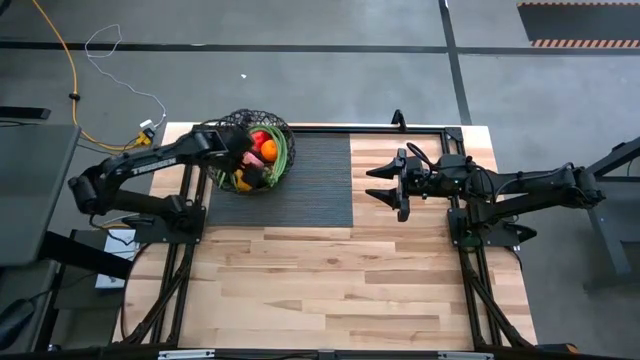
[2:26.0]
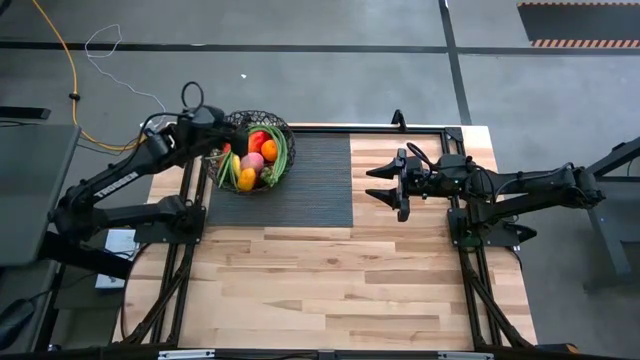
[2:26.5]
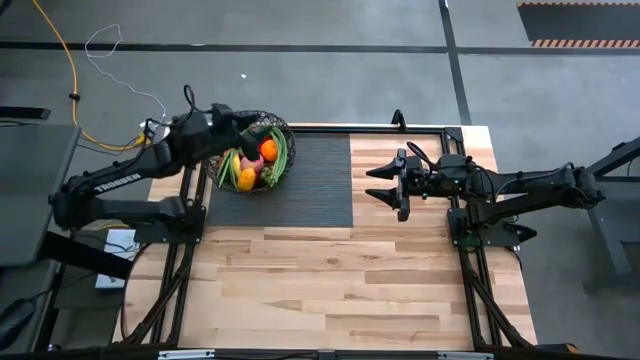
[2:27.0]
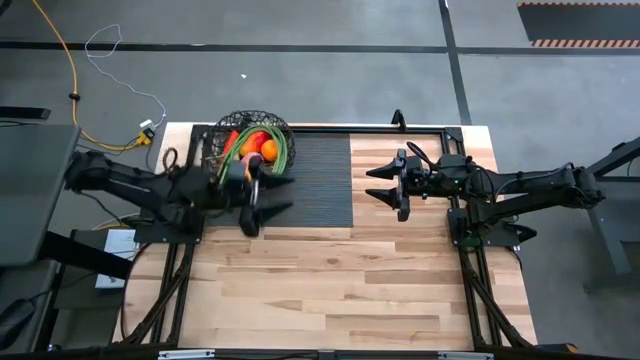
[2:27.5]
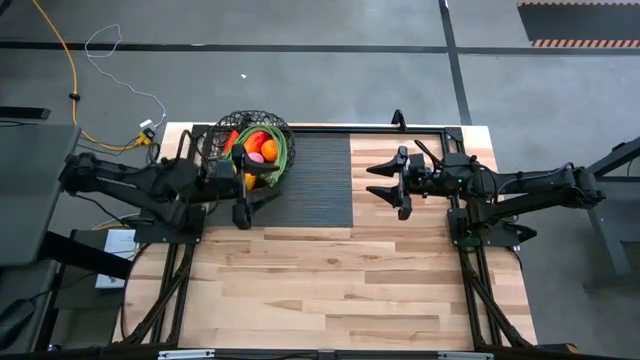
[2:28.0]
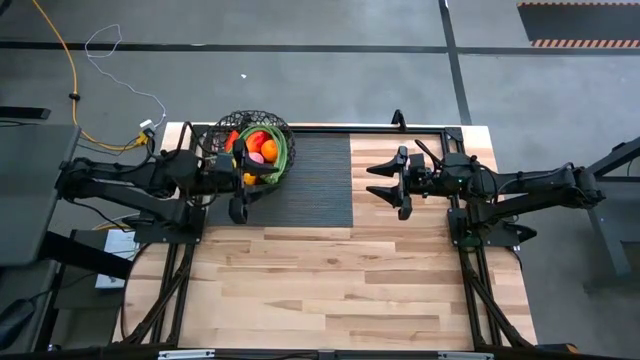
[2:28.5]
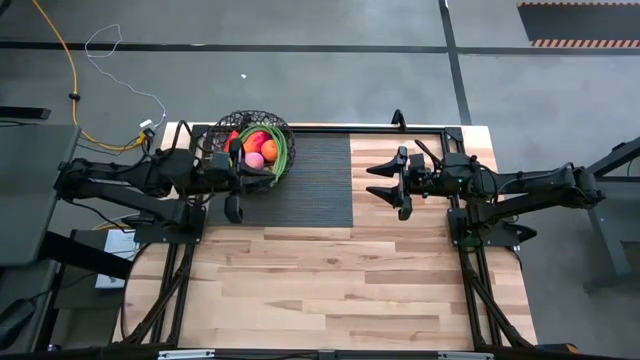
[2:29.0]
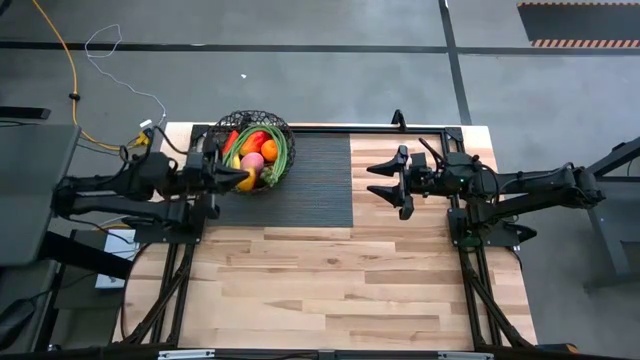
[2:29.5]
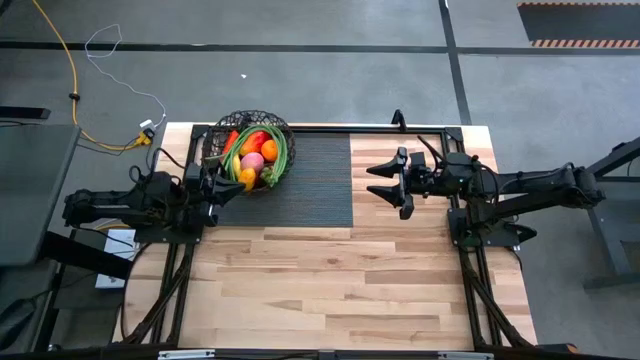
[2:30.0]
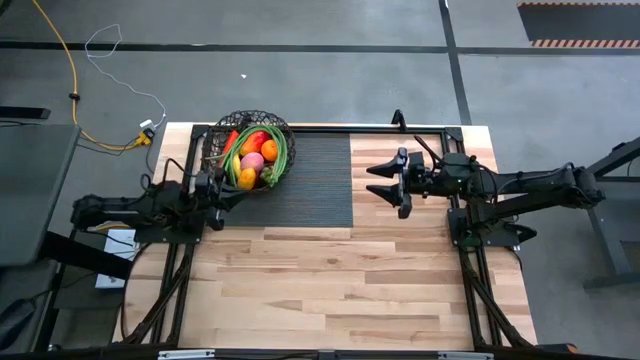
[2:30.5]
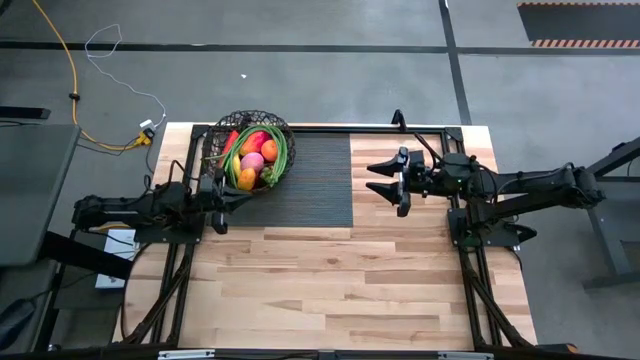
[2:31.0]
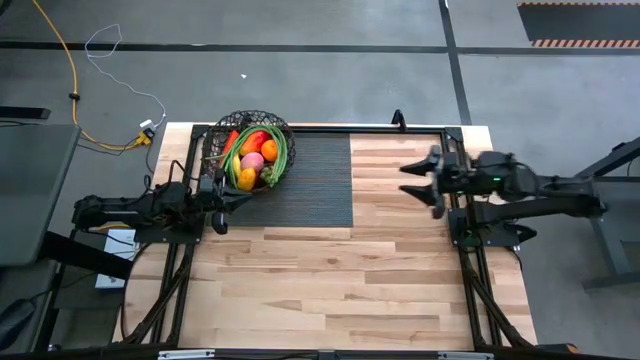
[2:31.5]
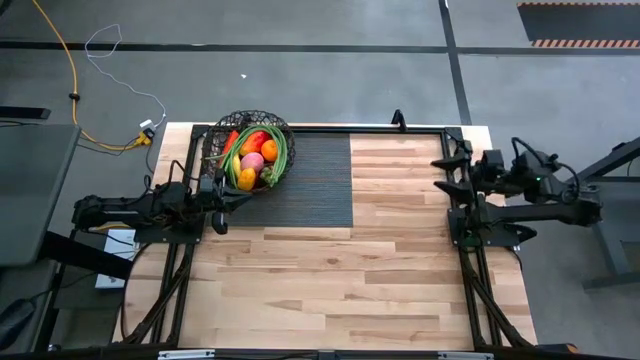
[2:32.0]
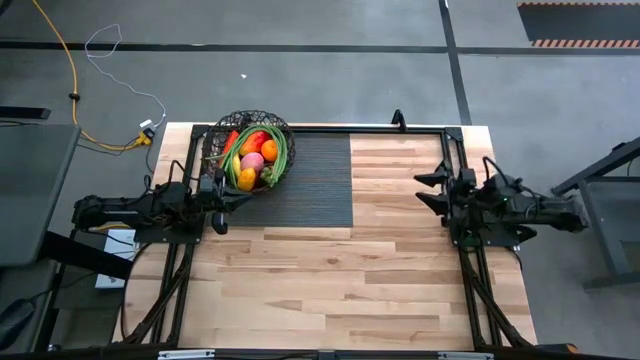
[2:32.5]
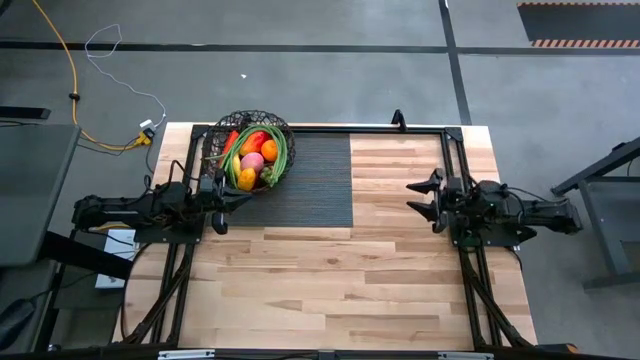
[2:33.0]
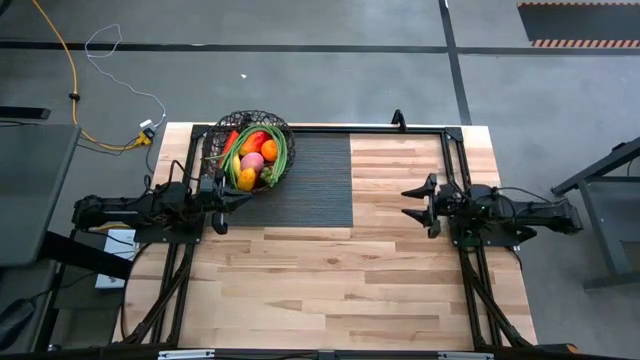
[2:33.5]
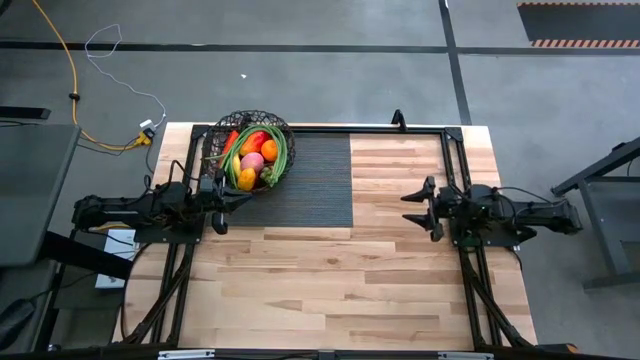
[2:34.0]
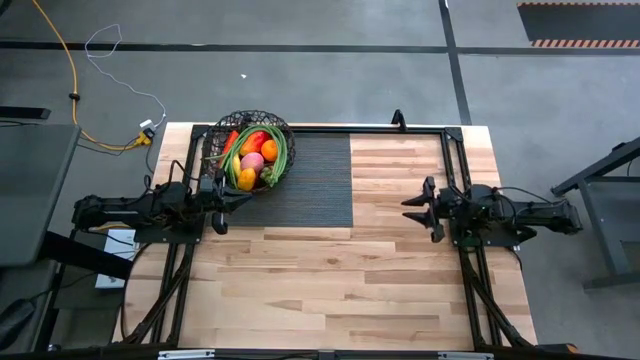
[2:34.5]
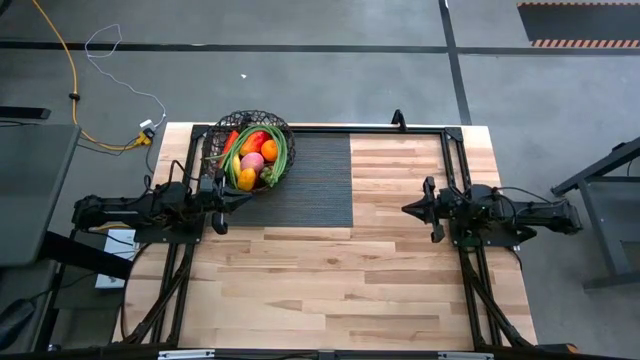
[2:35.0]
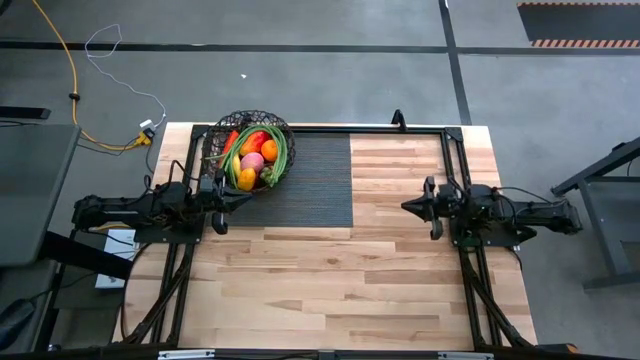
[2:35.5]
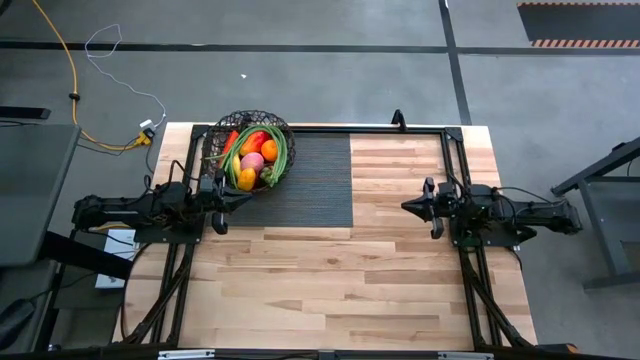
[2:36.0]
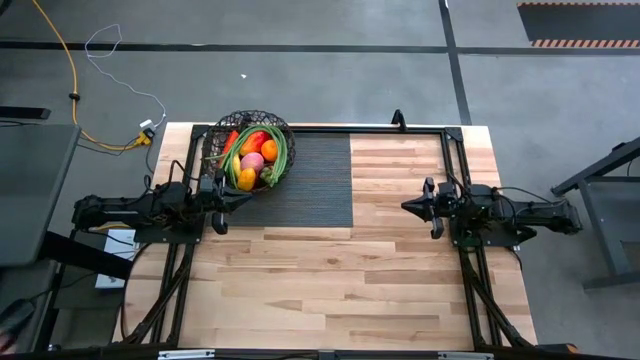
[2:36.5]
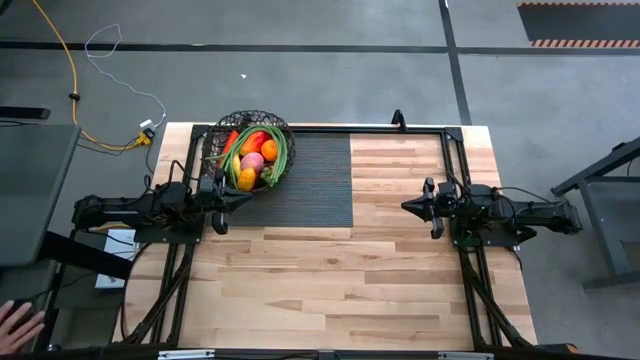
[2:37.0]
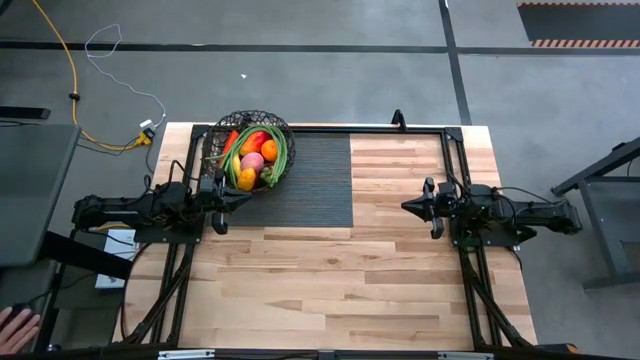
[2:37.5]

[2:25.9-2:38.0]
Task: Build produce basket
Return to Home Position

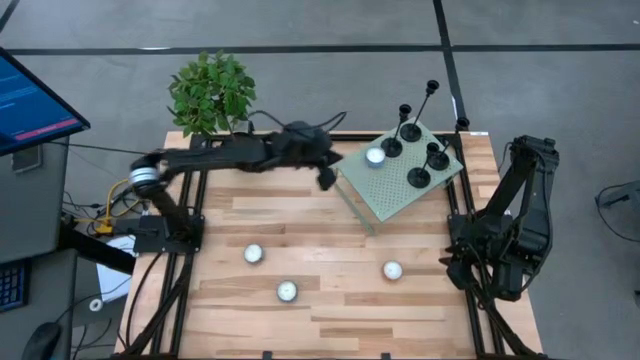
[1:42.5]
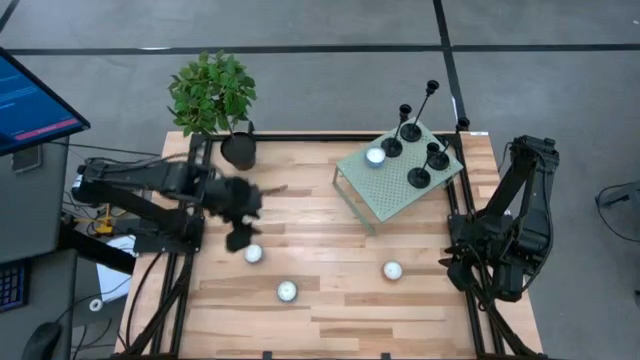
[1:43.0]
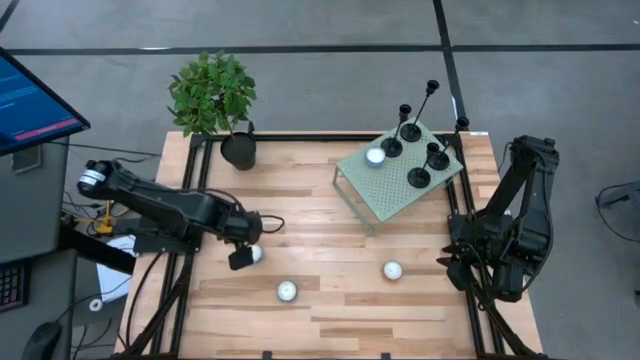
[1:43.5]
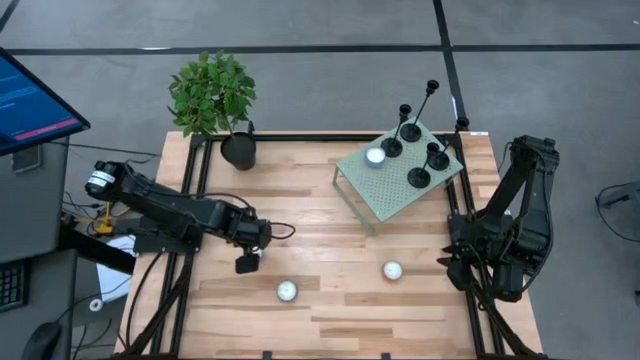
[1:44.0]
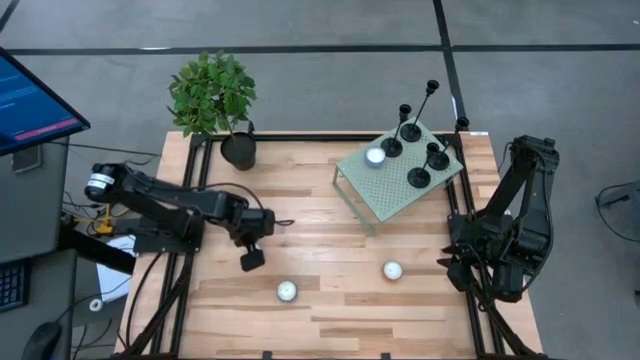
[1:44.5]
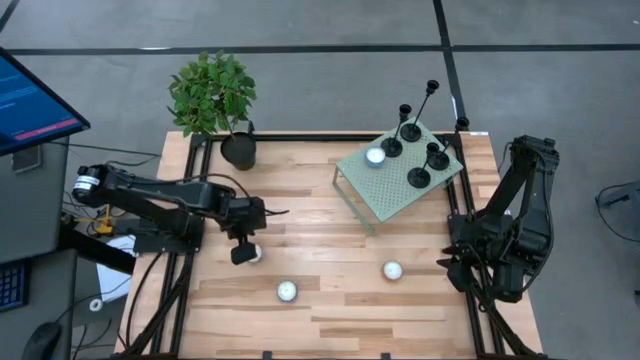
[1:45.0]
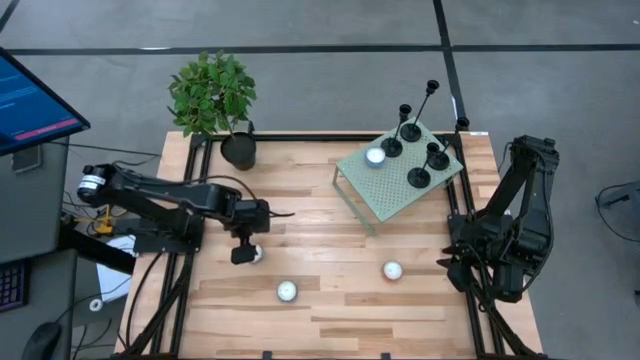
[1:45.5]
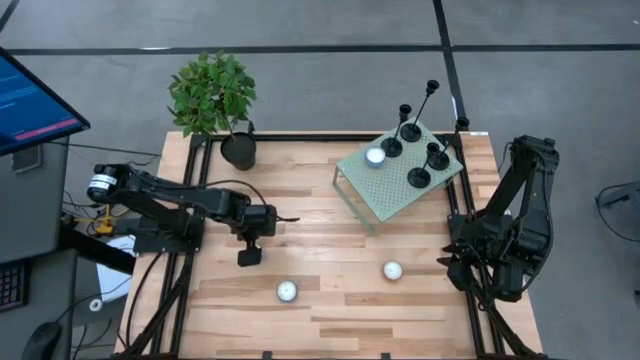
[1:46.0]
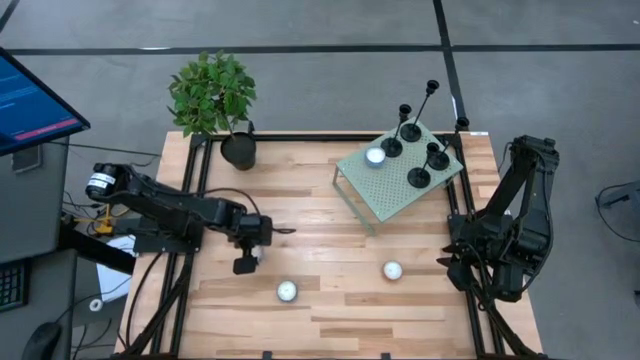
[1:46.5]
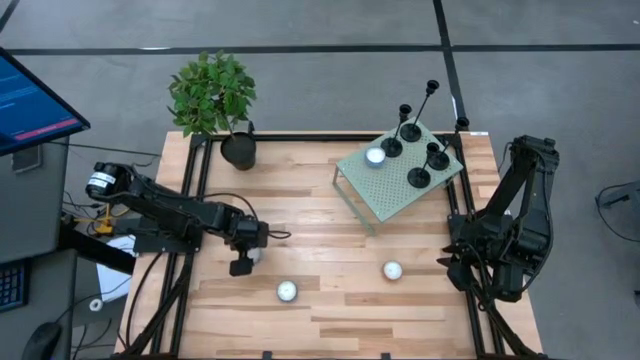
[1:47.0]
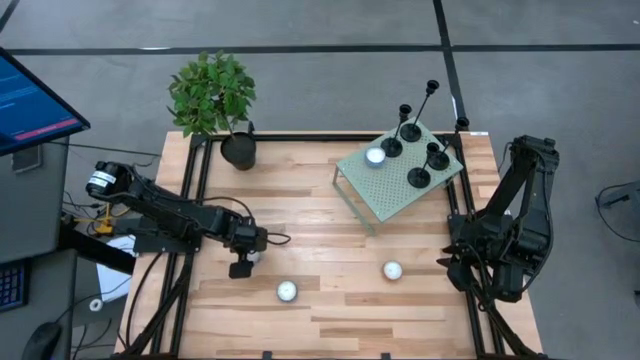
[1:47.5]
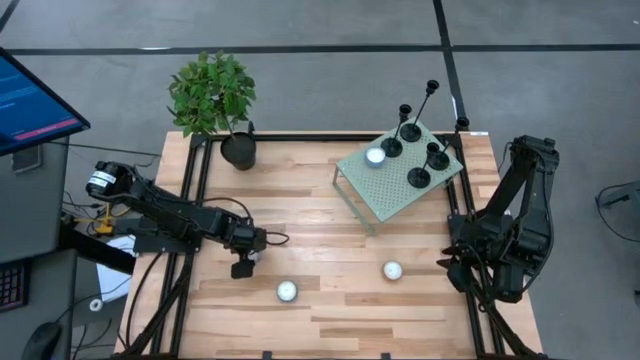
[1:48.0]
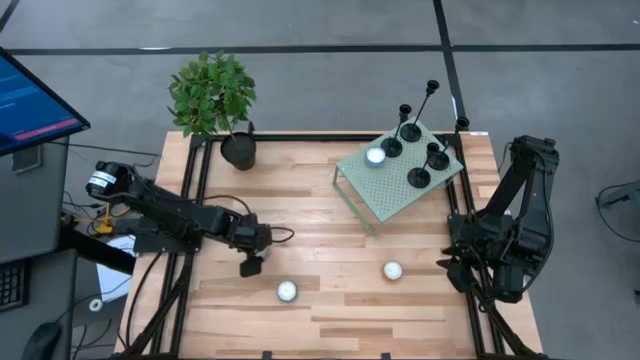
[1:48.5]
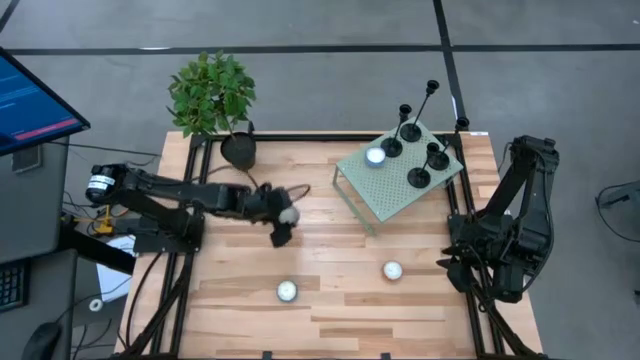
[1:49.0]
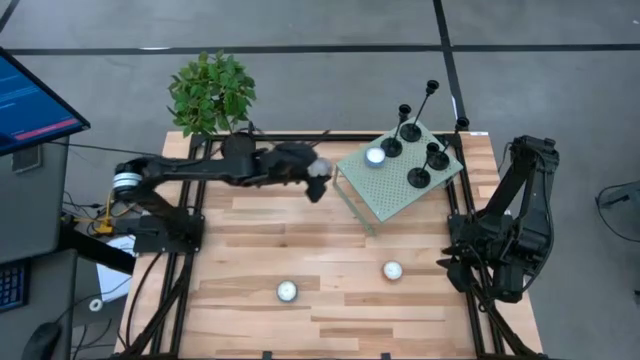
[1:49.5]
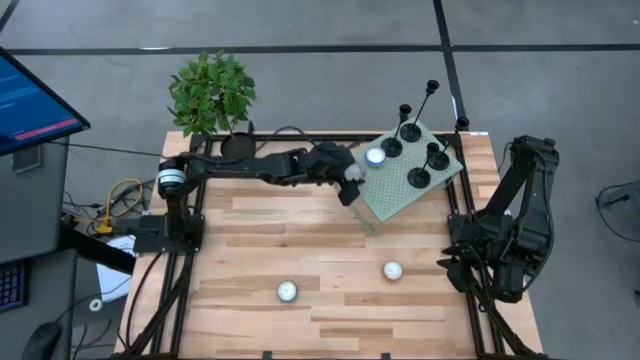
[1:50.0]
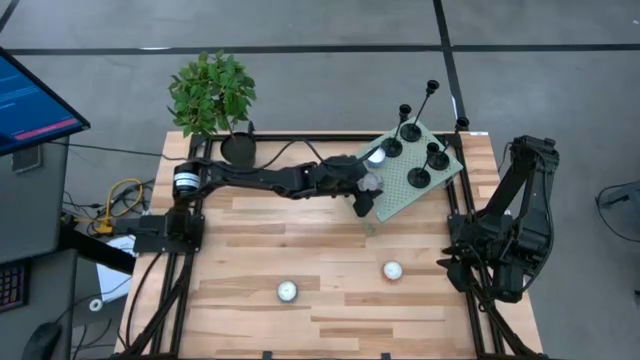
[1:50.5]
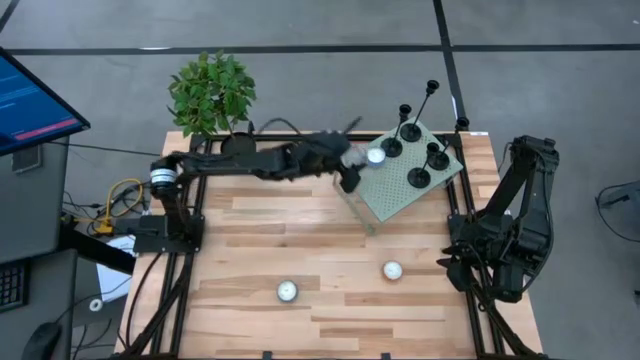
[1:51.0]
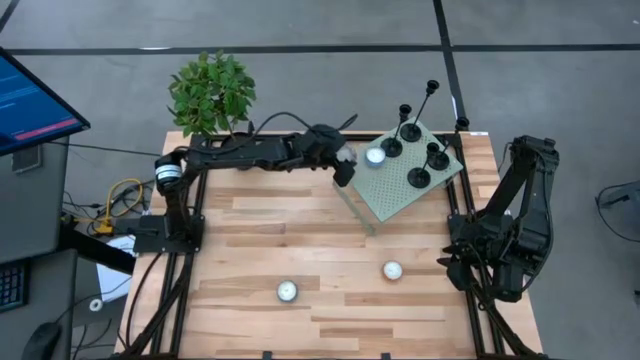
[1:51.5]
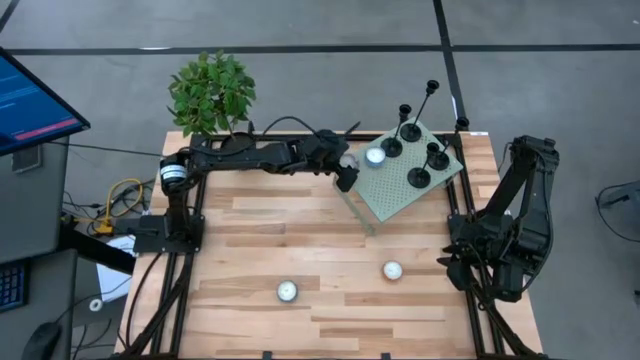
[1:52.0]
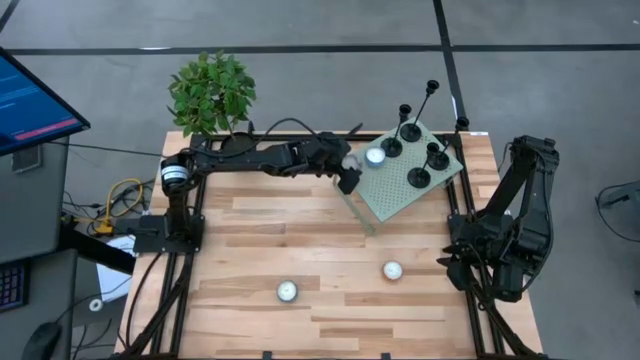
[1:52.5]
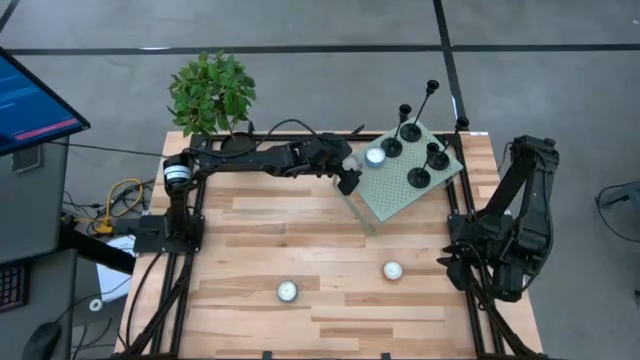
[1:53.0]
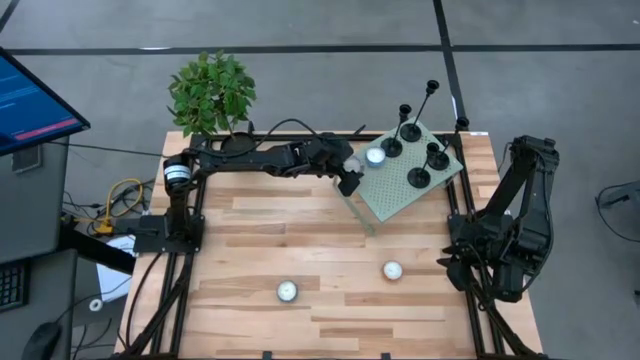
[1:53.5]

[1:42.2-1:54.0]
Task: Pick & Place candle stick holders
Put the red scented candle on the shelf
